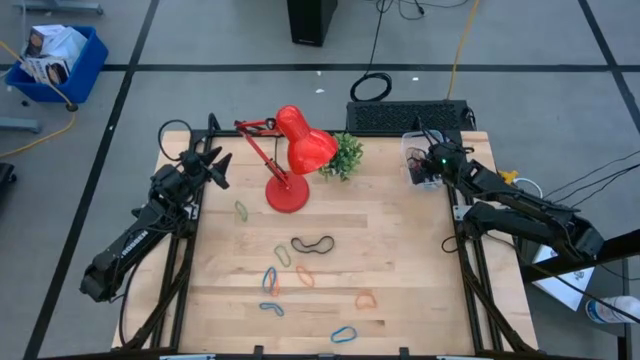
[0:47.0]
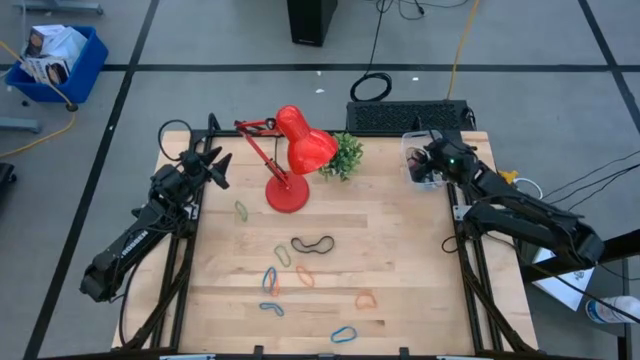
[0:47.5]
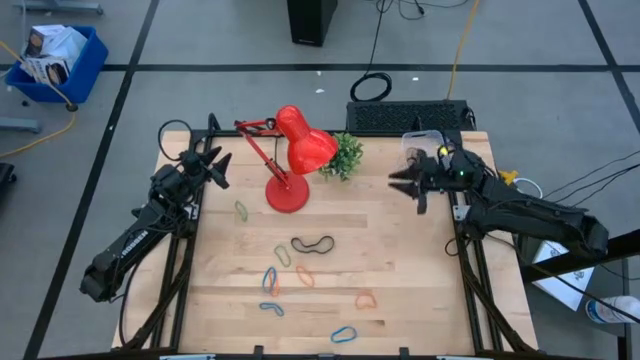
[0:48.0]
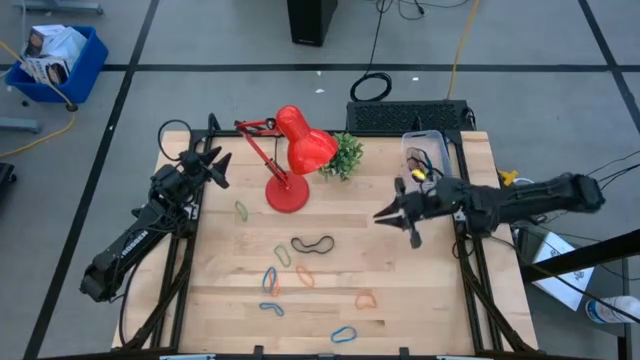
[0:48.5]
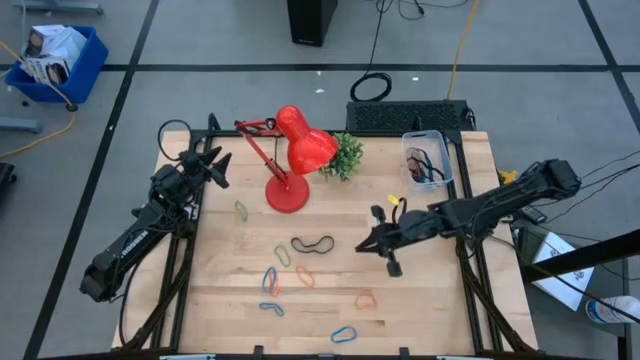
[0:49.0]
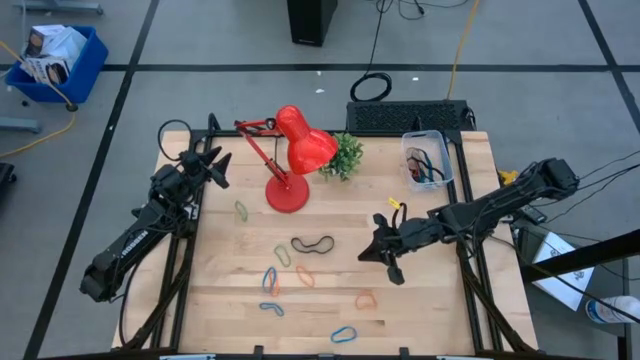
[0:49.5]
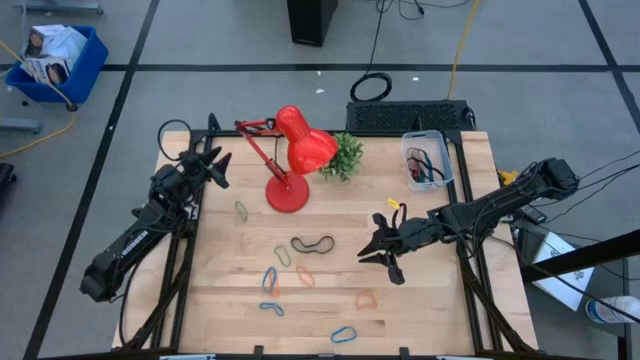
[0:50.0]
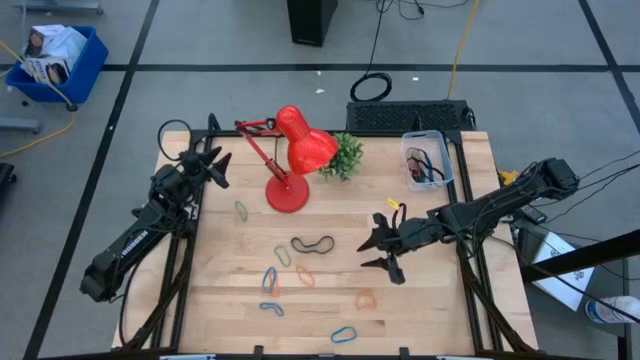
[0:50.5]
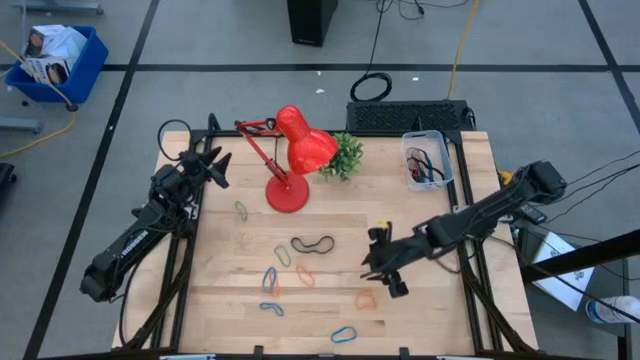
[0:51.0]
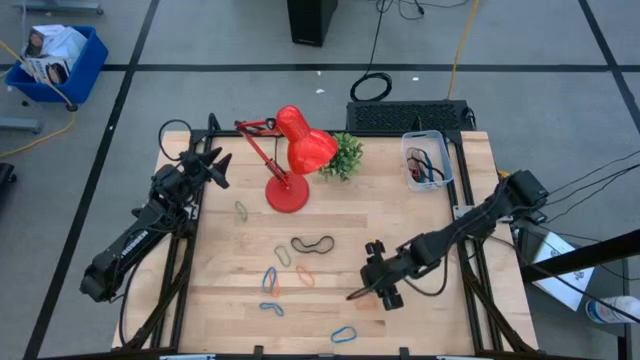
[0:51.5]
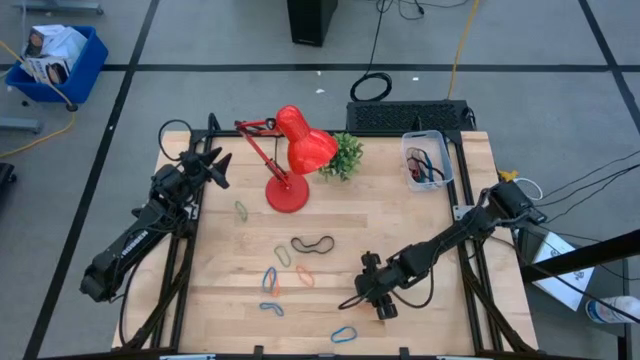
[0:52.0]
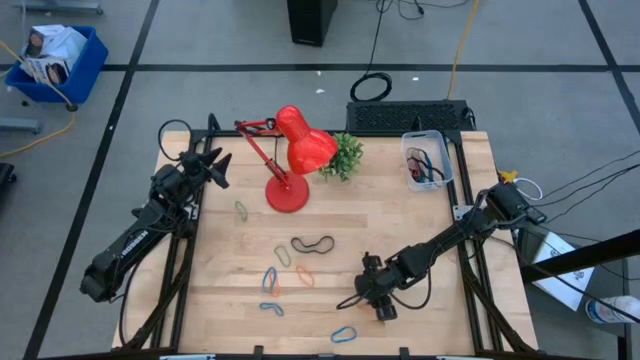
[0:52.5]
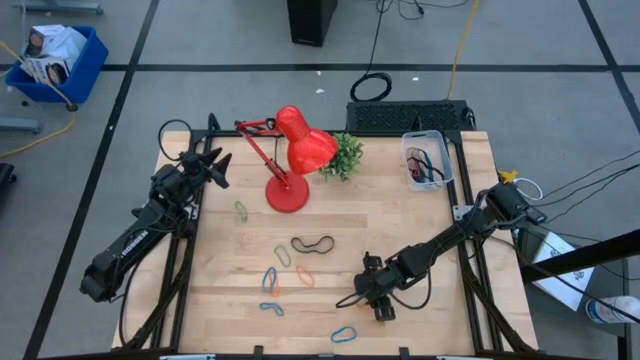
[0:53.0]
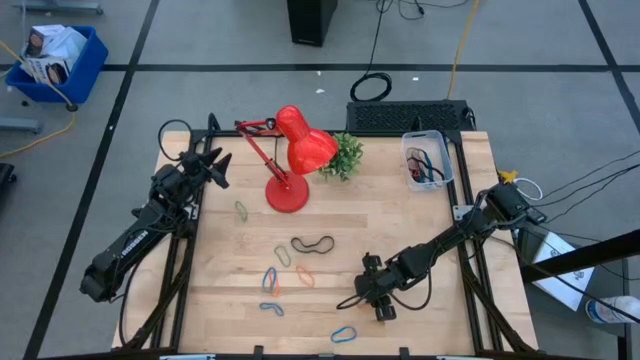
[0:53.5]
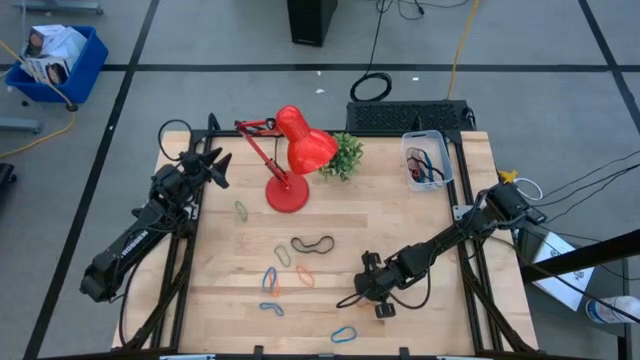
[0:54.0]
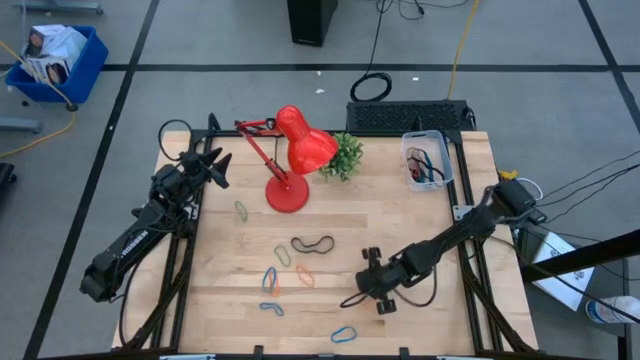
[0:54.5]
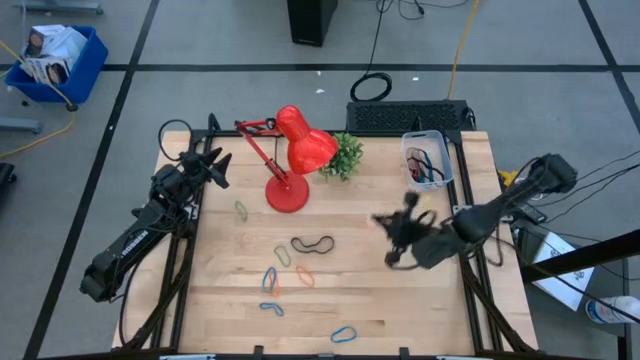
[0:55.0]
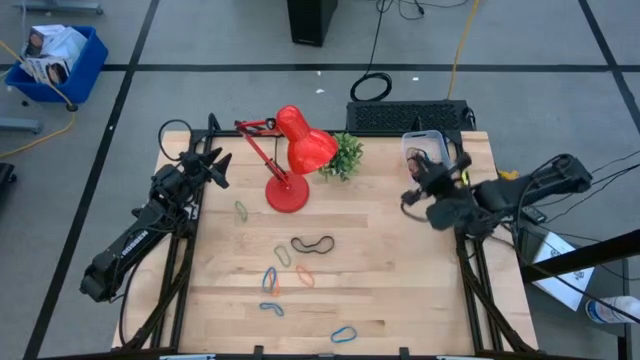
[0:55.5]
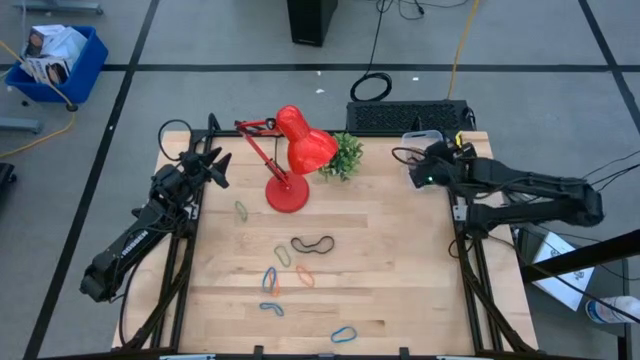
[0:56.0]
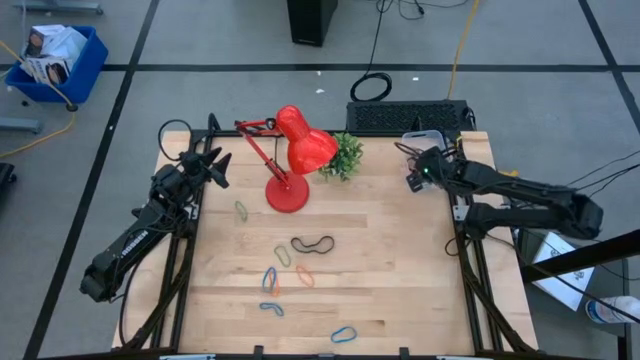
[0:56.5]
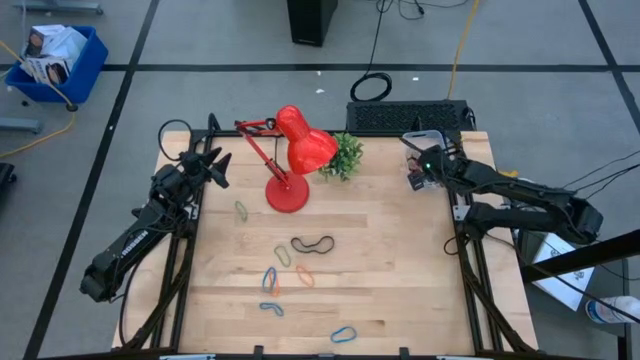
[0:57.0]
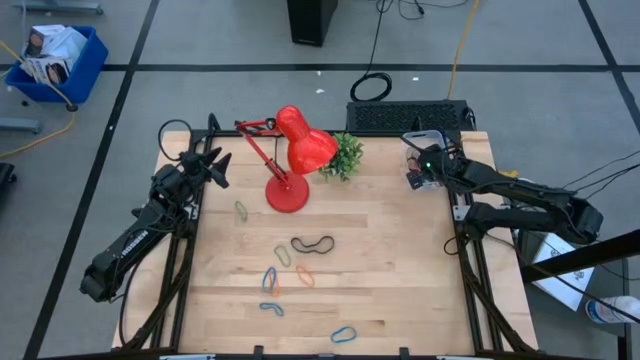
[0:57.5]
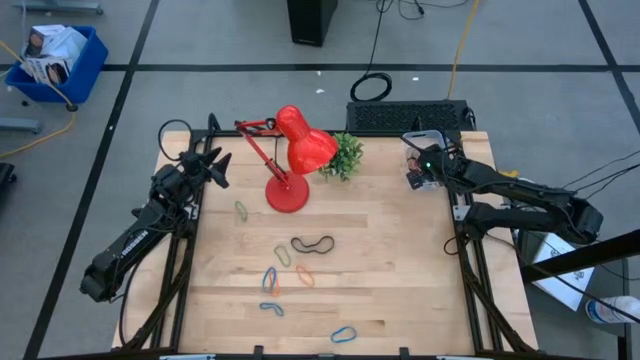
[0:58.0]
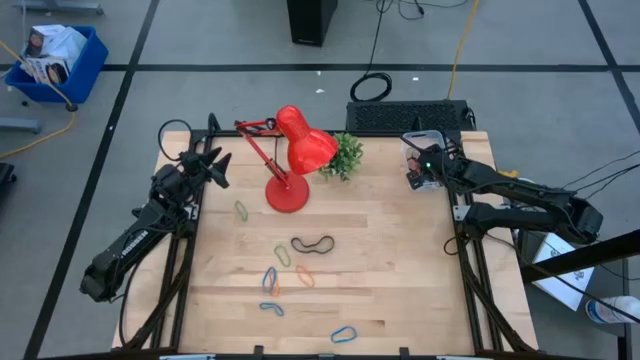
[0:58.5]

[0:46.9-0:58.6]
Task: Pick and place rubber bands into bin
Put the bottom orange rubber band into the transparent bin

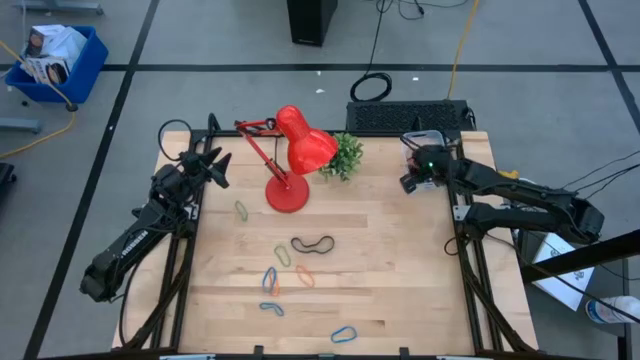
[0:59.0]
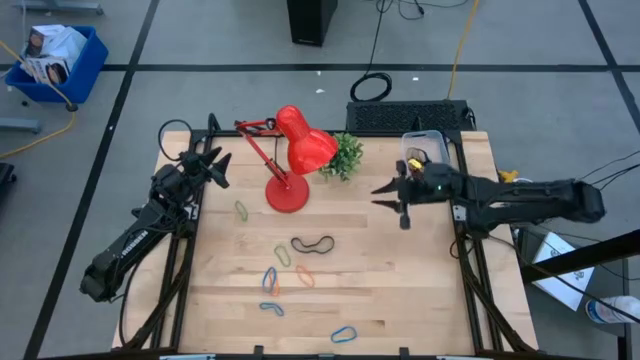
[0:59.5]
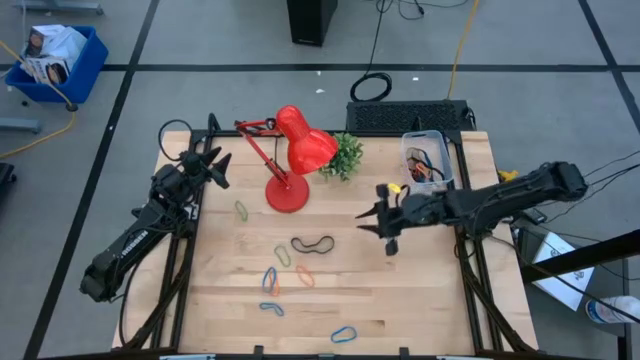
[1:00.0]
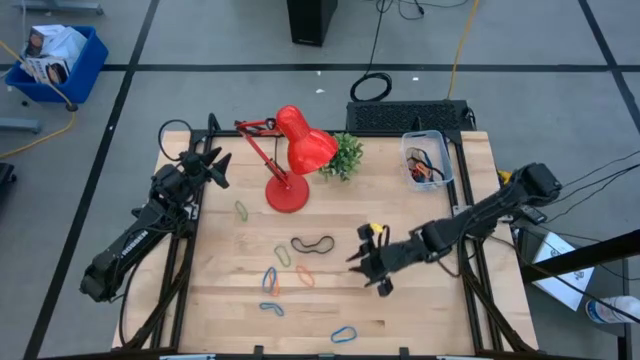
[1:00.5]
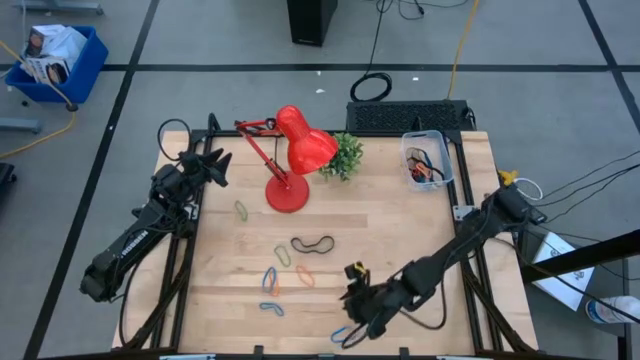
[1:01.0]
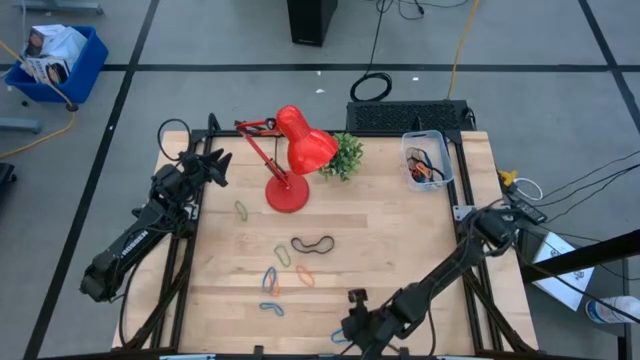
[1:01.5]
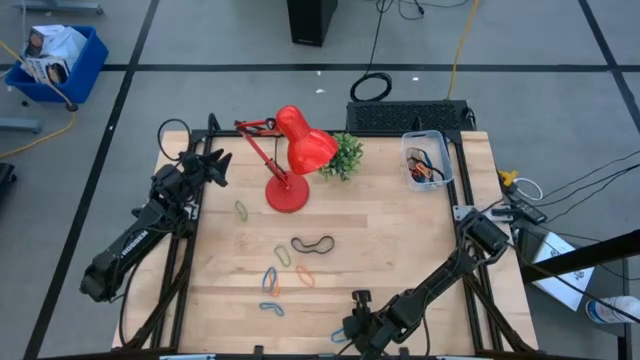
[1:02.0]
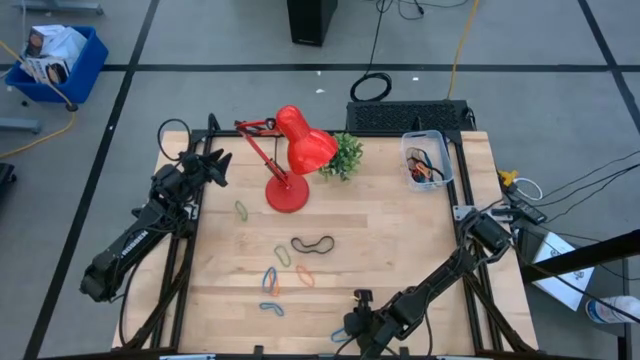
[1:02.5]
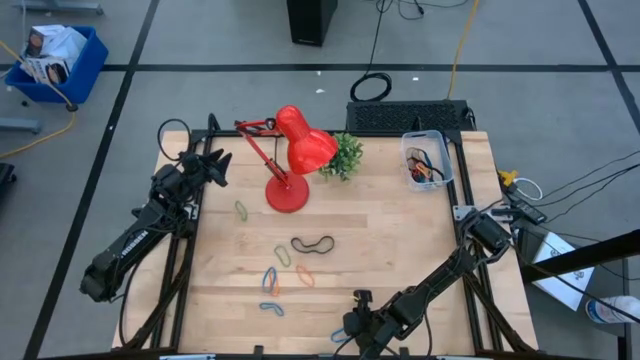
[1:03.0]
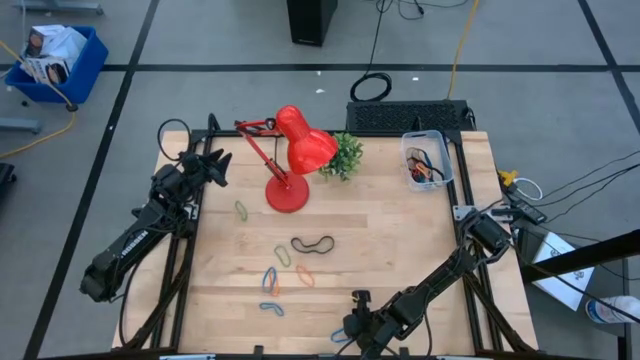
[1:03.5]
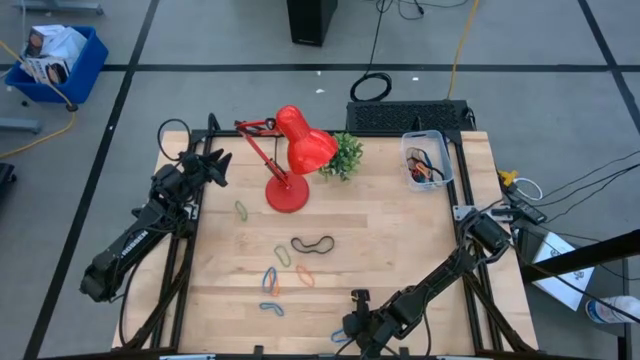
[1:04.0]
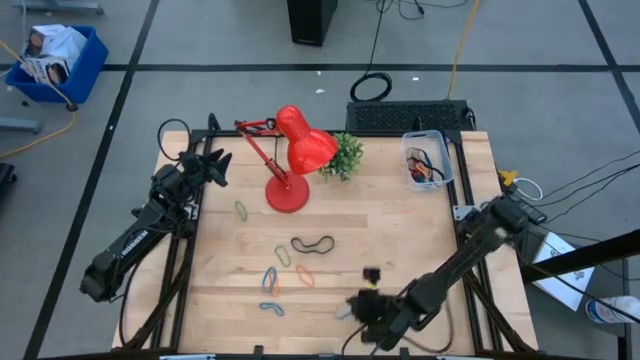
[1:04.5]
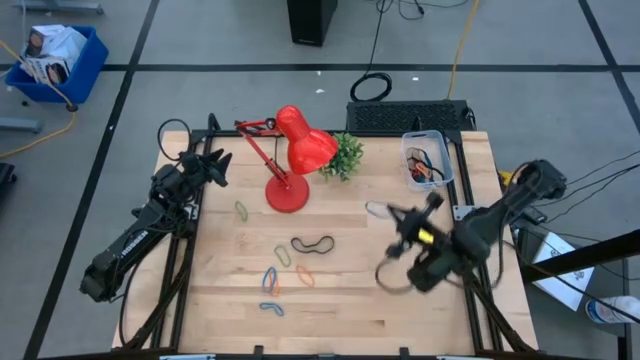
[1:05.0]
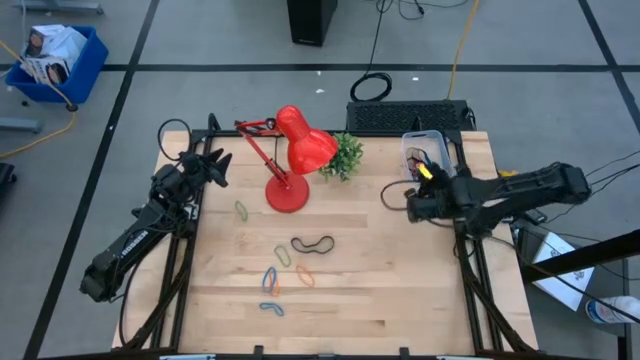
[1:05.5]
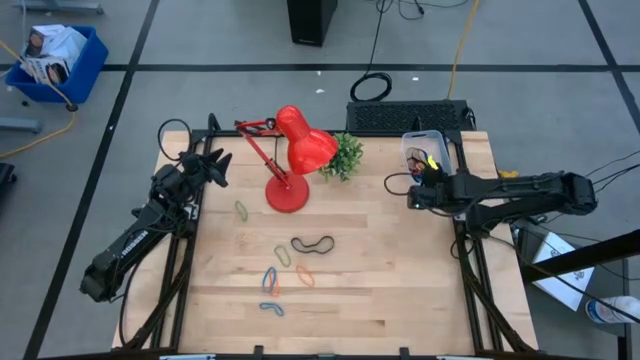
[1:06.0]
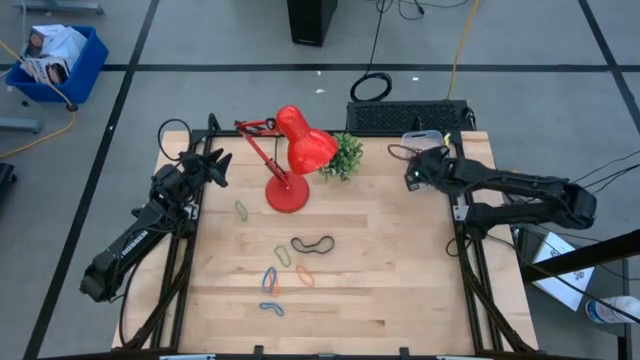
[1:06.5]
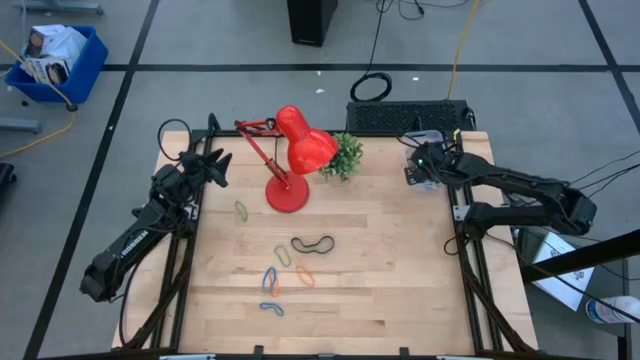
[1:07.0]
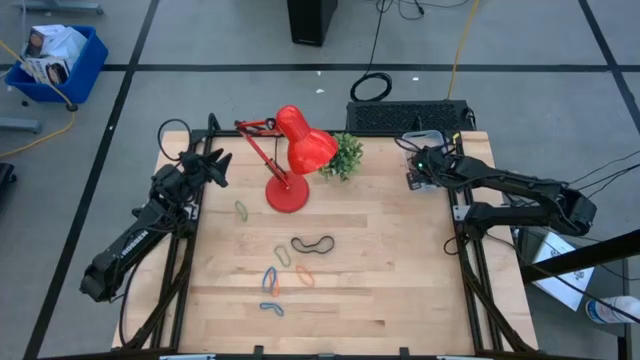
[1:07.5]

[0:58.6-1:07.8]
Put the bottom blue rubber band into the transparent bin

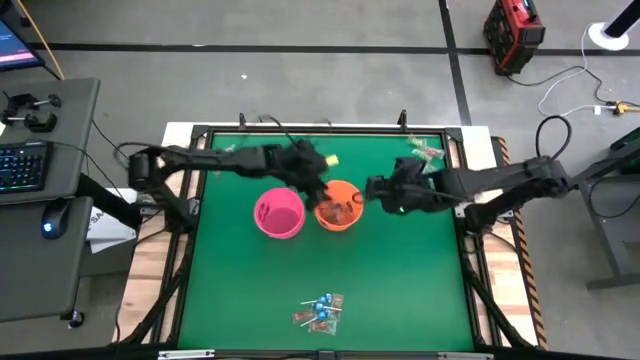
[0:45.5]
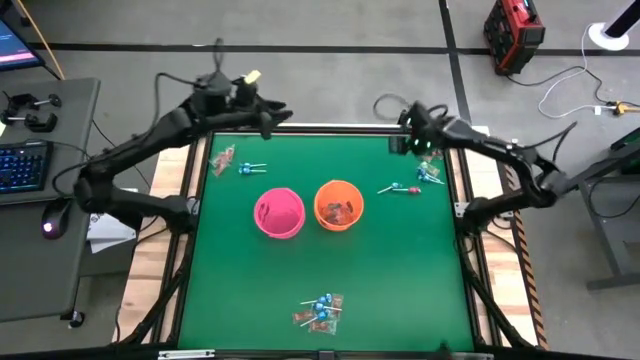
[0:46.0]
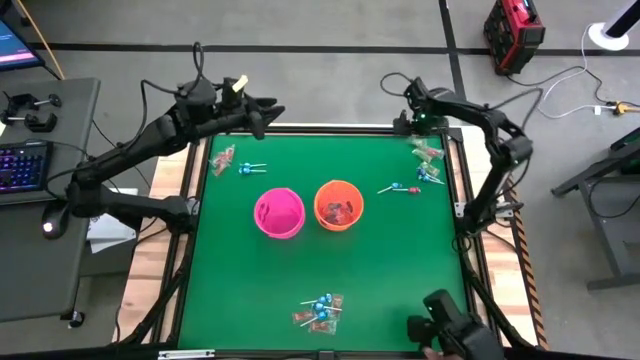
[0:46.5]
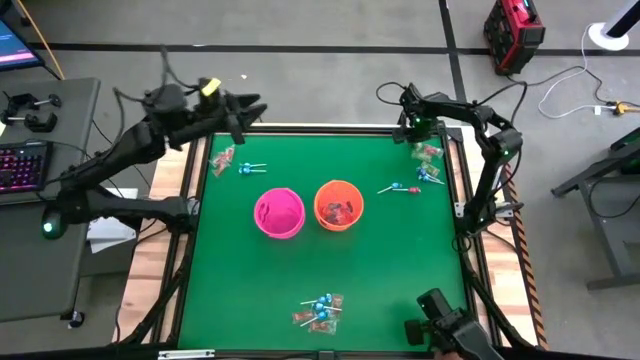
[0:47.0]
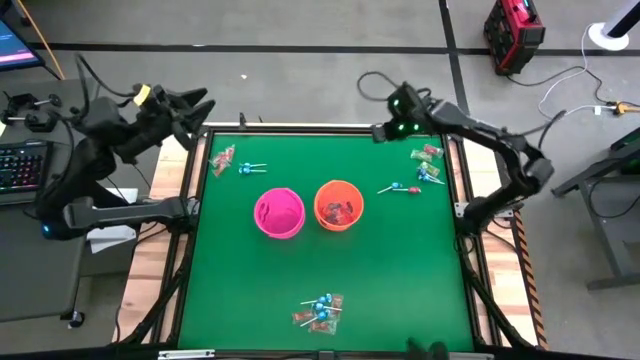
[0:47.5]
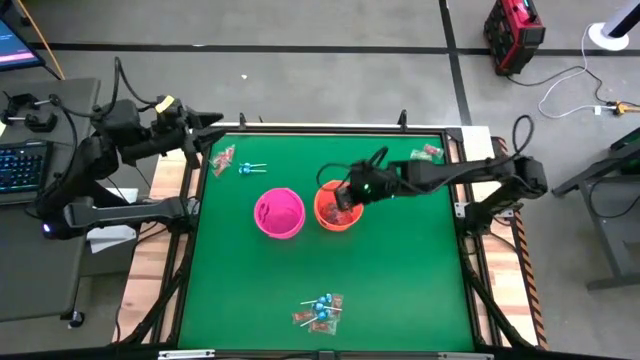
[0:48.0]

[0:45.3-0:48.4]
Task: Sort candy by brand, put in halloween buckets
Put the green gummy into the orange bucket
